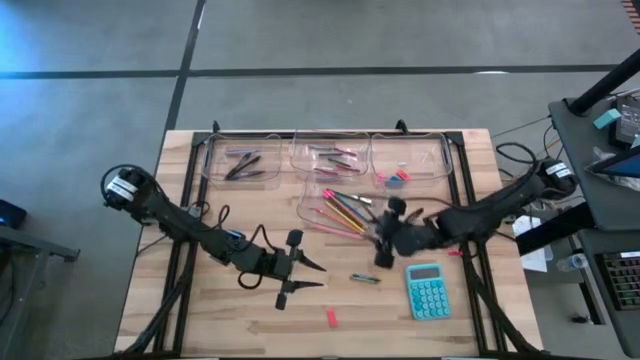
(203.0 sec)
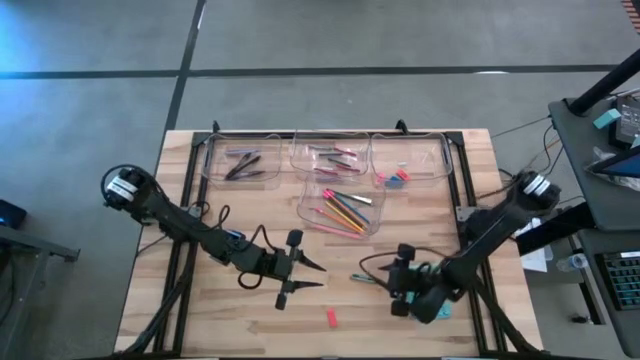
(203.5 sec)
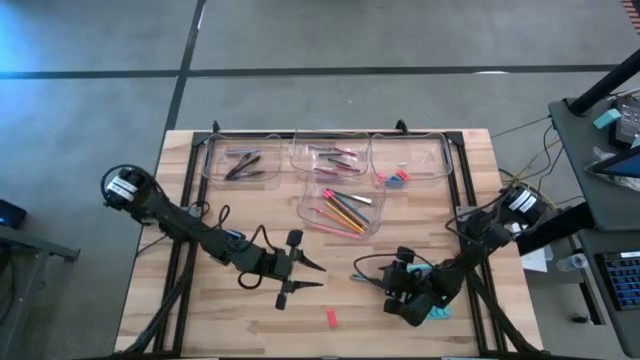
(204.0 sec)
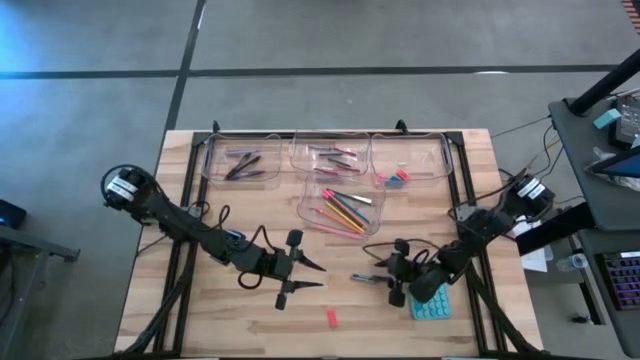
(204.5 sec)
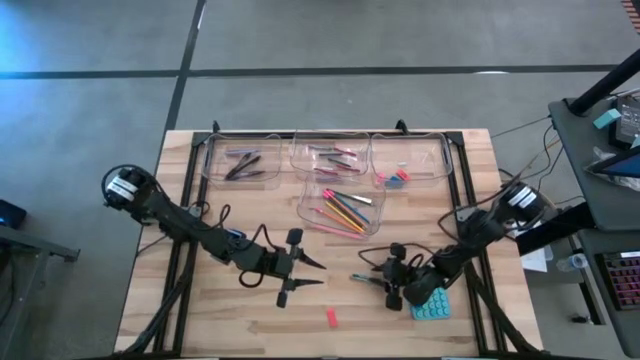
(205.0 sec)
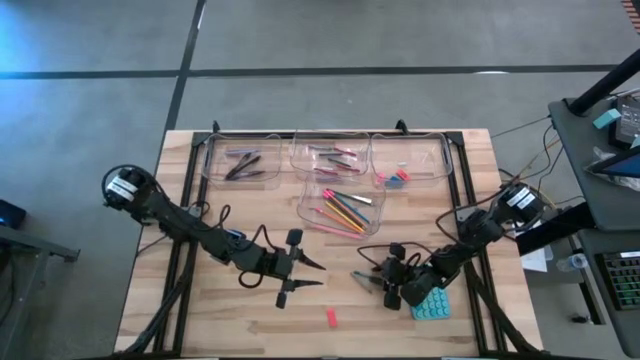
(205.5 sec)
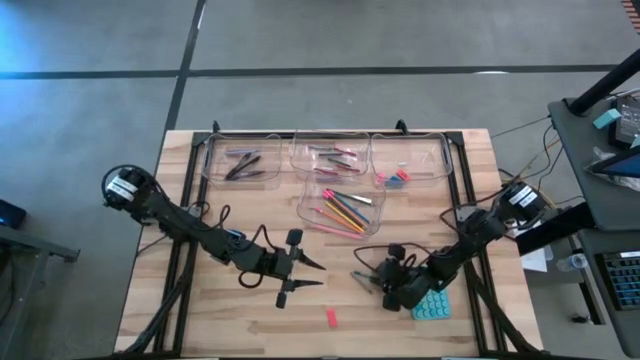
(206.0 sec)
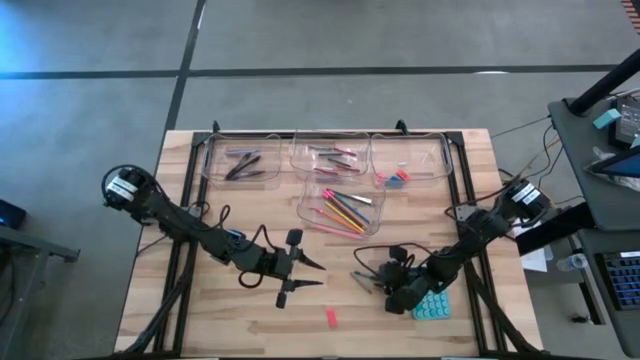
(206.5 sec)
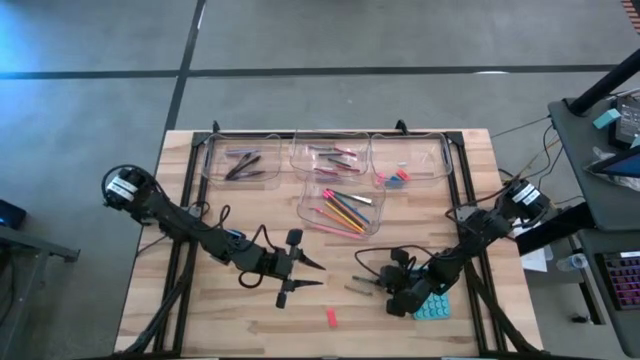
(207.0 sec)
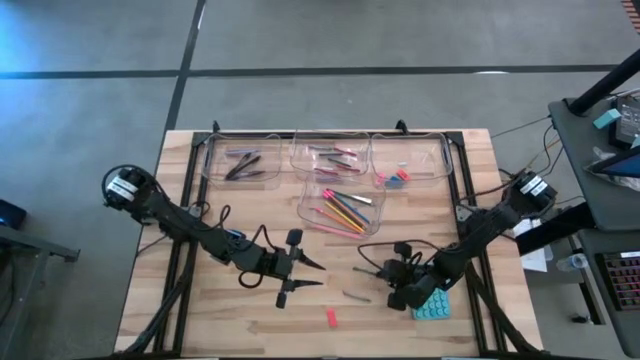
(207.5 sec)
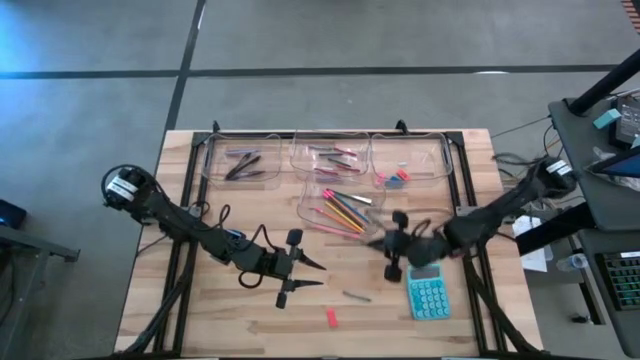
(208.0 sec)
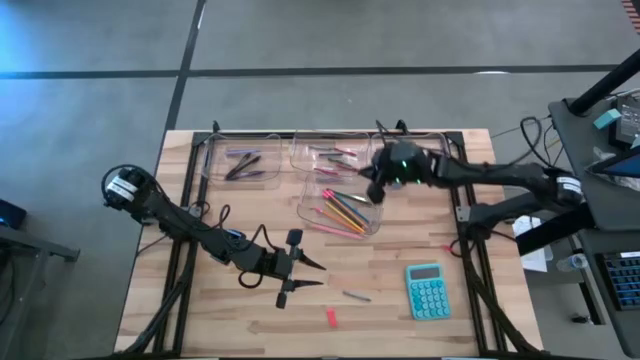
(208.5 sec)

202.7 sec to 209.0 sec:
Task: Sort crayons/erasers/pens/pencils in bins
Put the green crayon into the top middle transparent bin

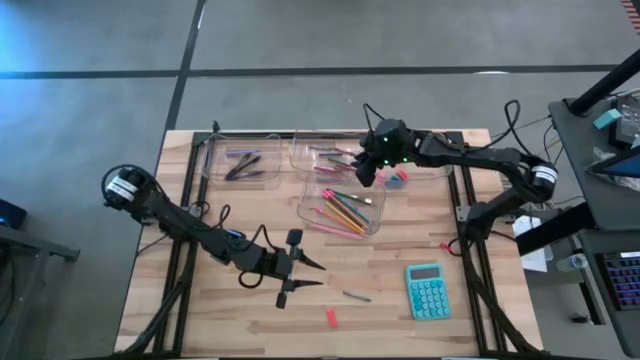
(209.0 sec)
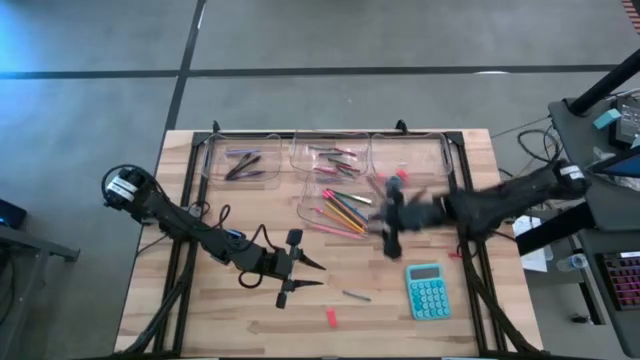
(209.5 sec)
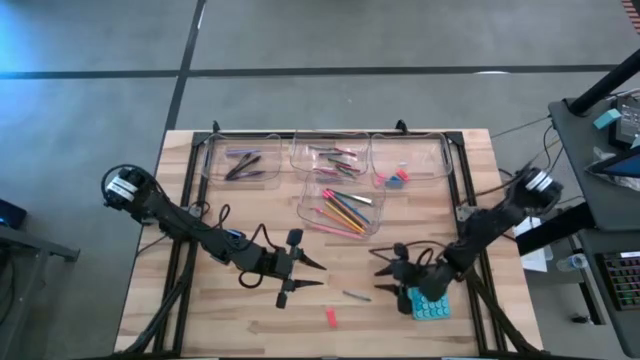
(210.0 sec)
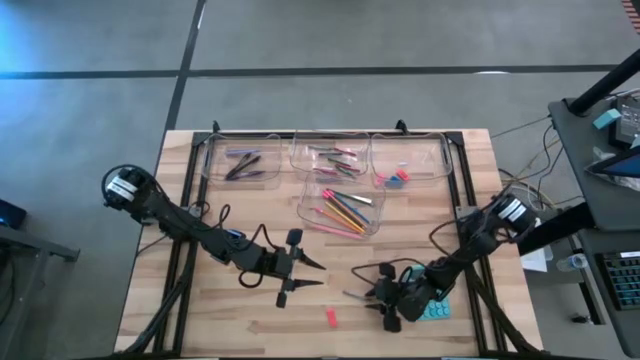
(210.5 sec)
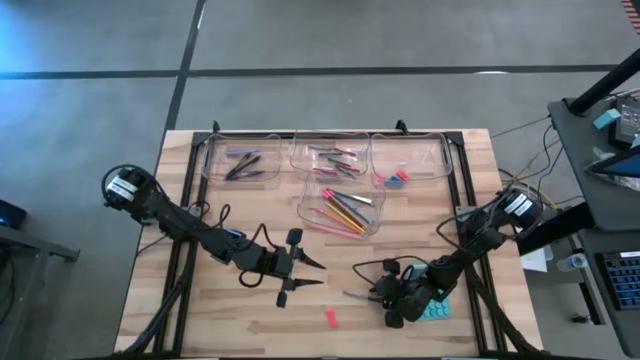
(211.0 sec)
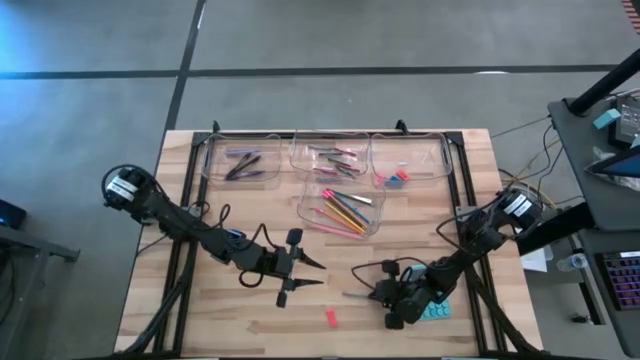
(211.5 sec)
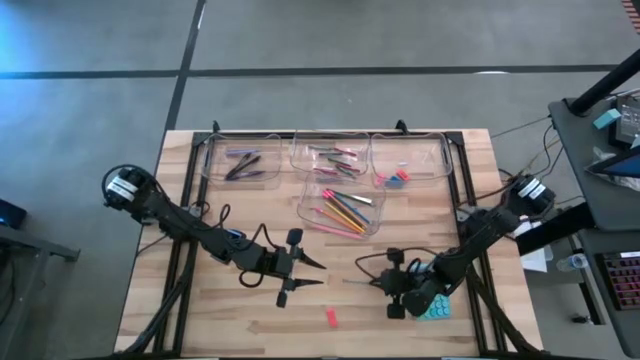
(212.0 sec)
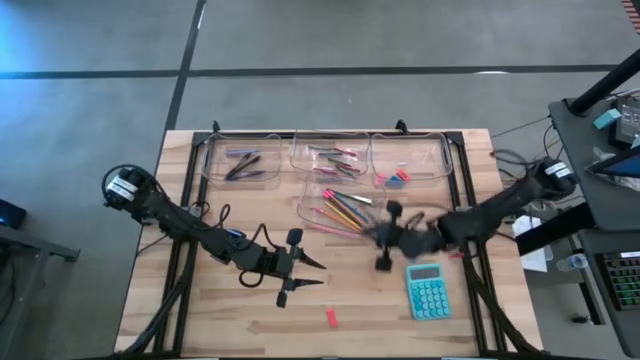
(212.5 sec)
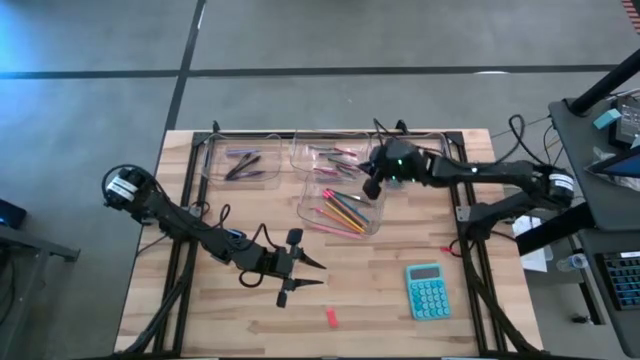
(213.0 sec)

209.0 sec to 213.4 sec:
Put the gray crayon into the top middle transparent bin

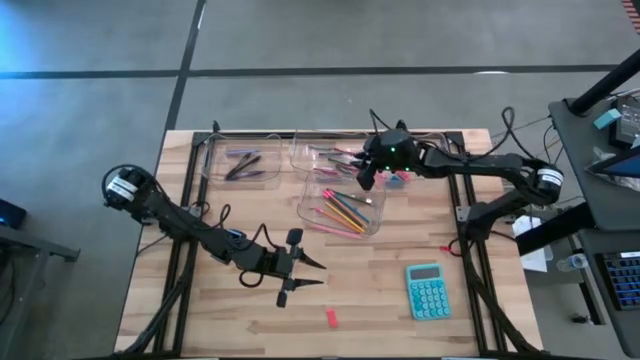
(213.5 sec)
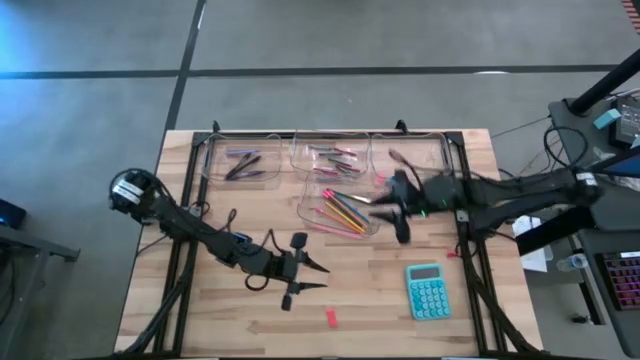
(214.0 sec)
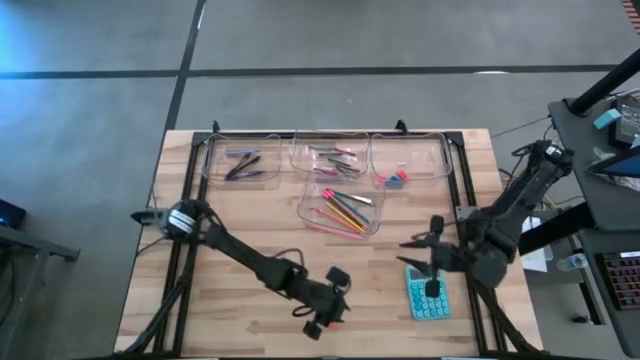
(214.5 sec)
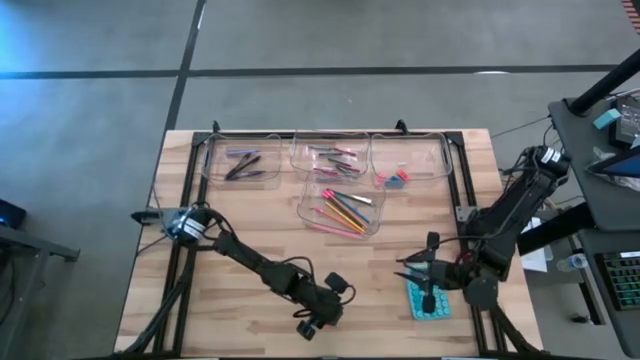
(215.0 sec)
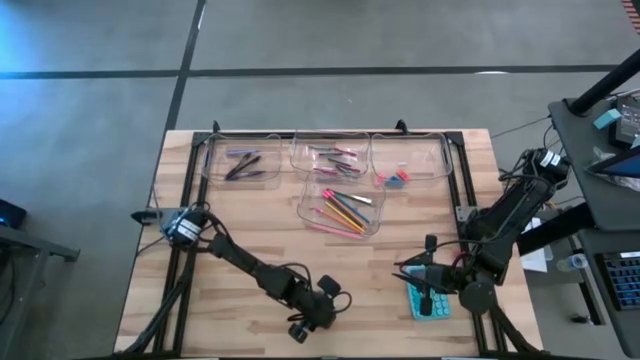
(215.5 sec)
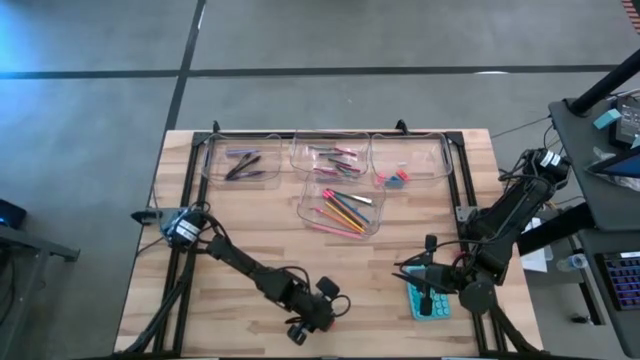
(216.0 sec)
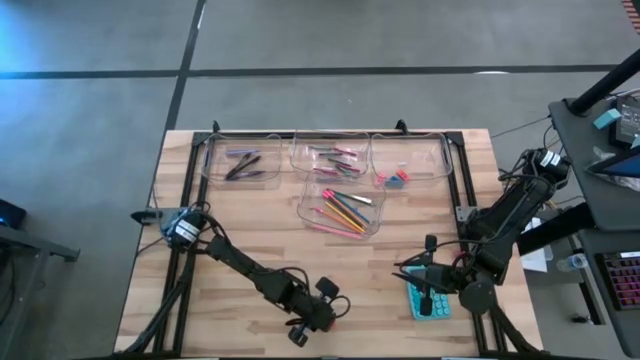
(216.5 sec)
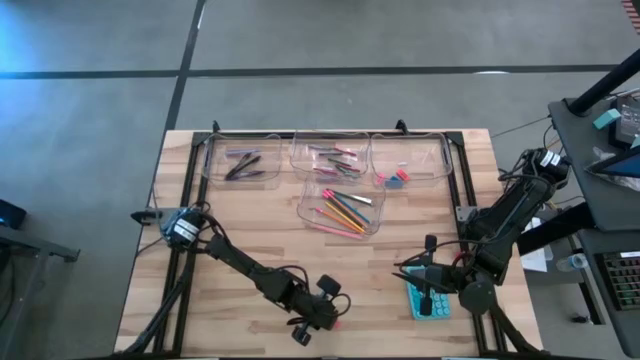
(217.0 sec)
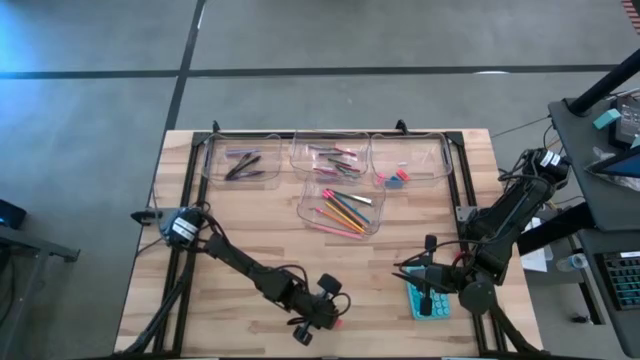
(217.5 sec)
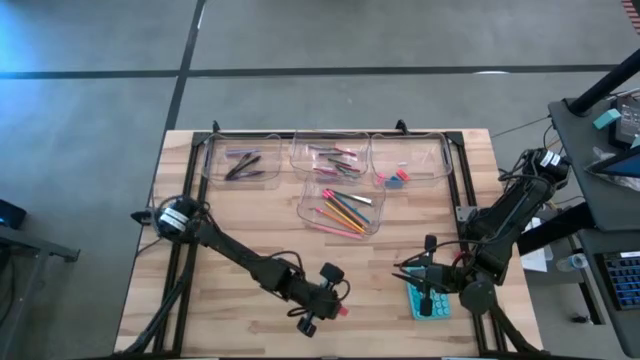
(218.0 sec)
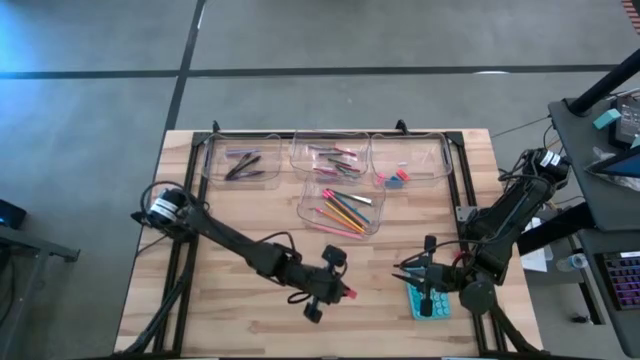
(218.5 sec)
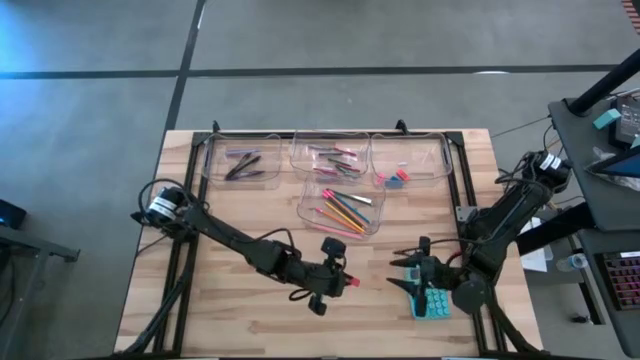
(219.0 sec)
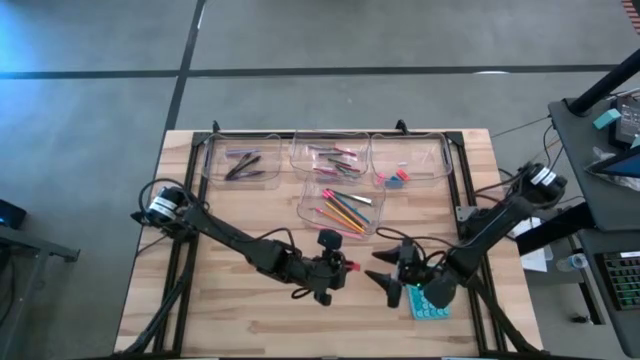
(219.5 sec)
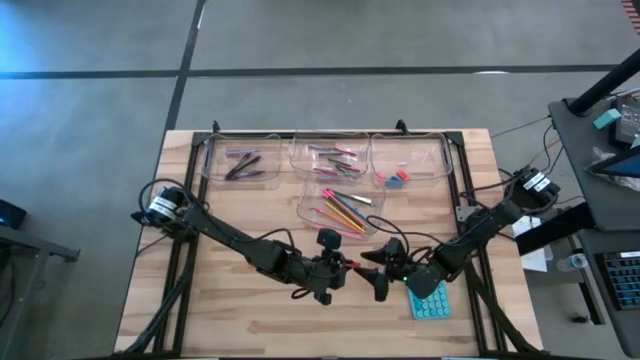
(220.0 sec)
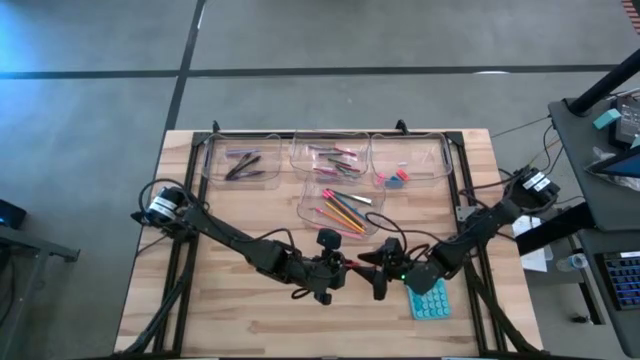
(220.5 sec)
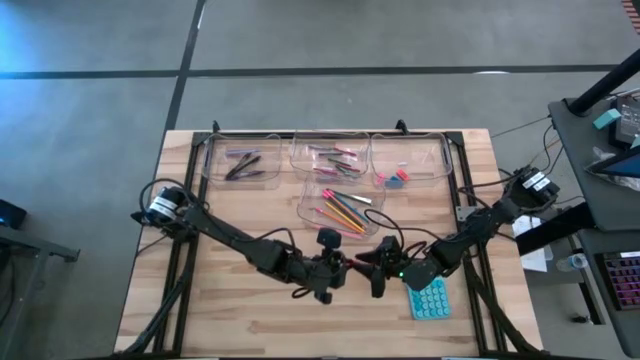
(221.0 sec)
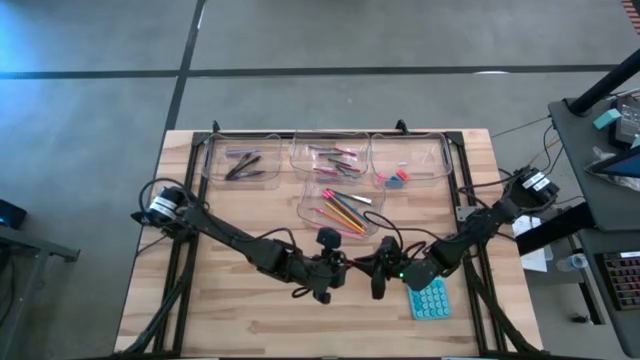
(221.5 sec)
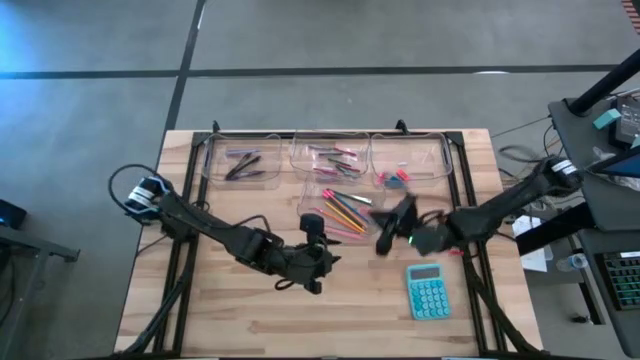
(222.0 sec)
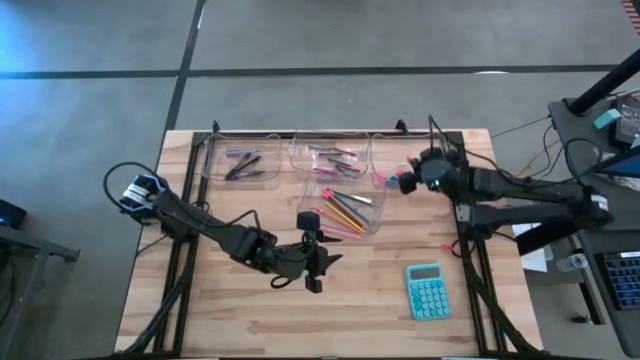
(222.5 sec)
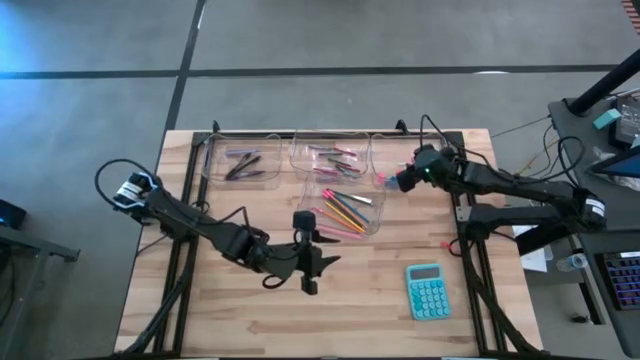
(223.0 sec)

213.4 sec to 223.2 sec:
Put the orange eraser into the top right transparent bin

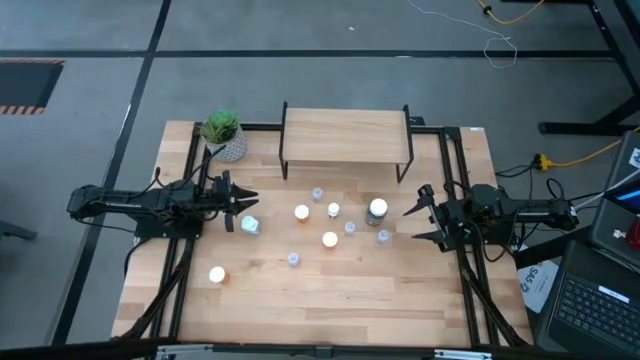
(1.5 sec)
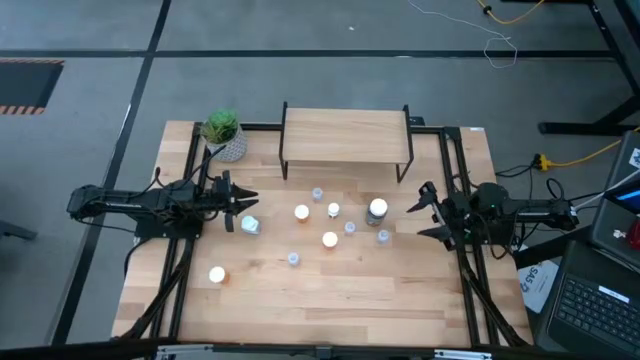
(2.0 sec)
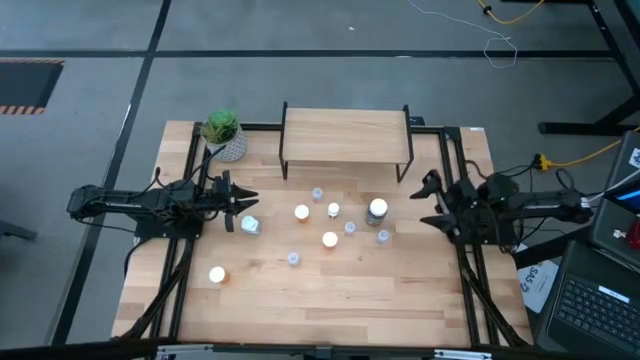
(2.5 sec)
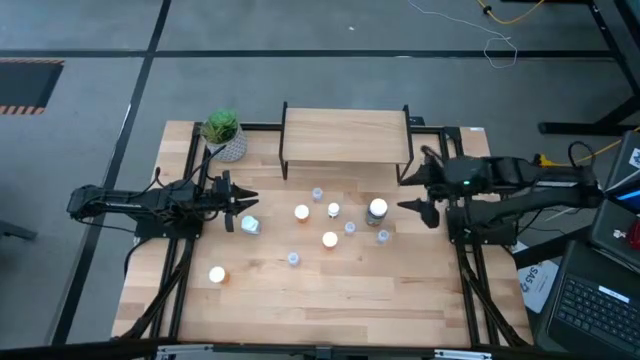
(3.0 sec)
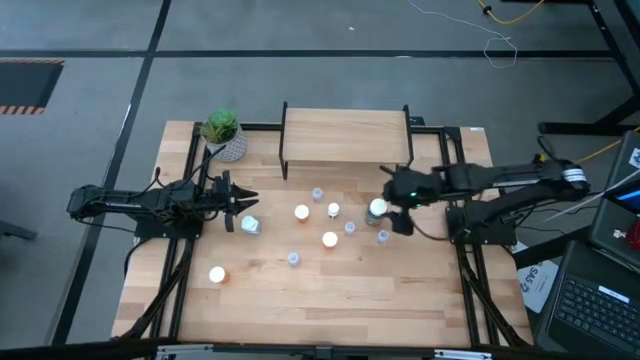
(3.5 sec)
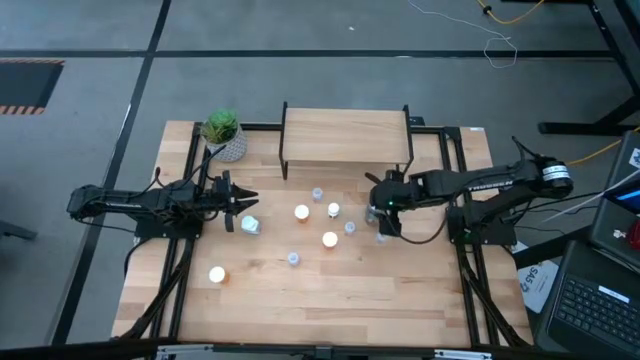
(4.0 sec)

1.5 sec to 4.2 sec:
Task: Pick and place medicine bottles onto shelf by color
Put the green pill bottle on the shelf
